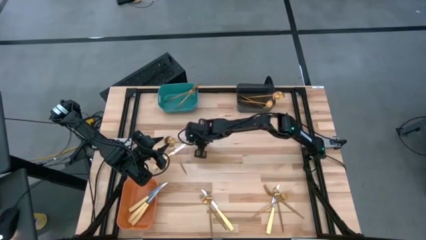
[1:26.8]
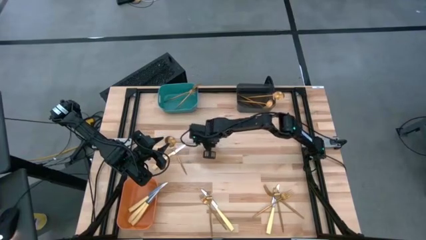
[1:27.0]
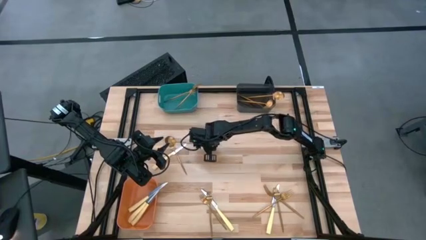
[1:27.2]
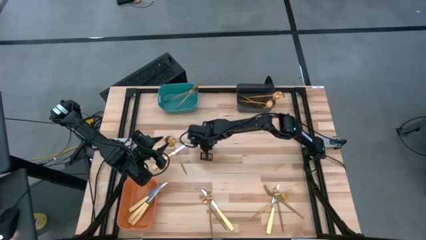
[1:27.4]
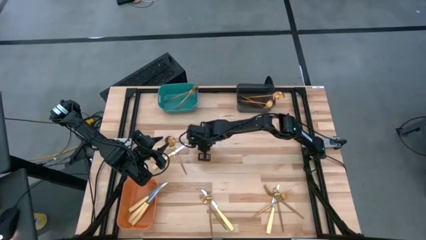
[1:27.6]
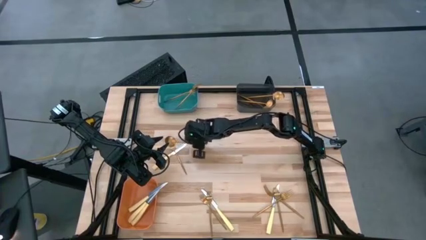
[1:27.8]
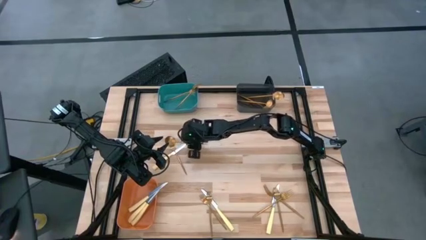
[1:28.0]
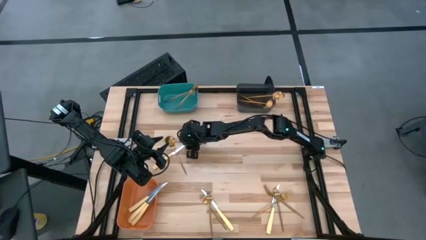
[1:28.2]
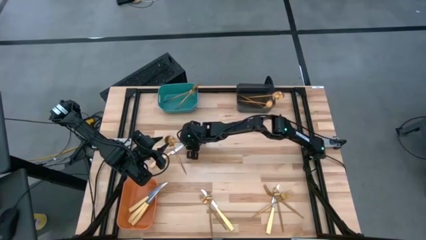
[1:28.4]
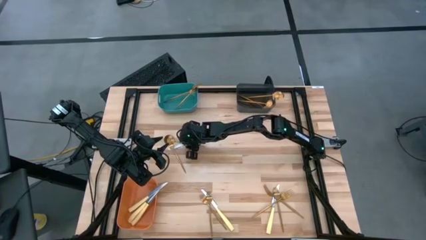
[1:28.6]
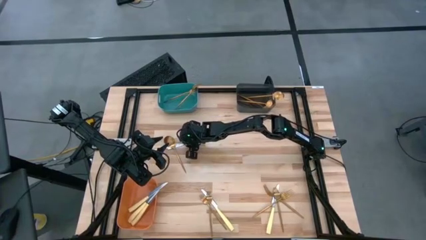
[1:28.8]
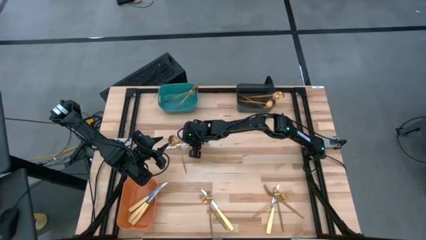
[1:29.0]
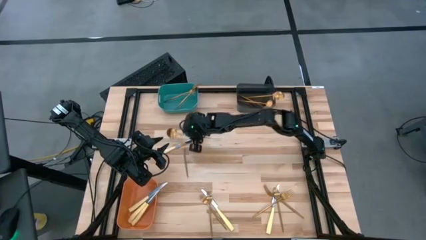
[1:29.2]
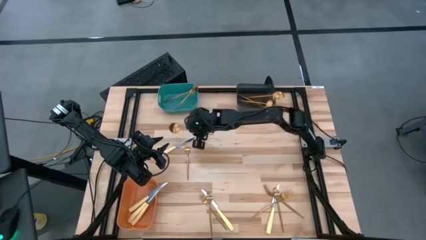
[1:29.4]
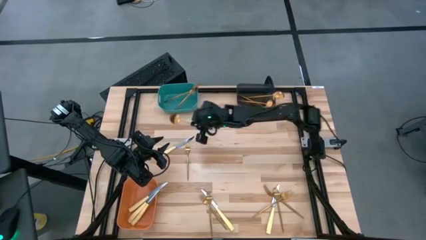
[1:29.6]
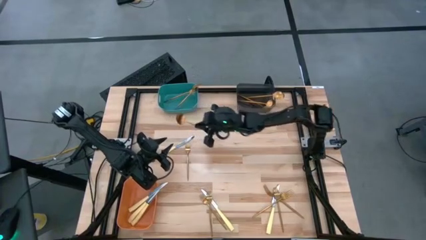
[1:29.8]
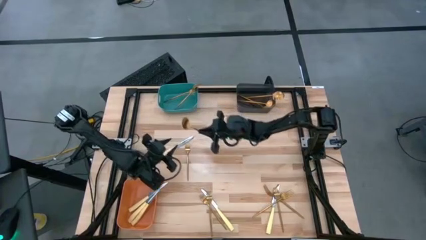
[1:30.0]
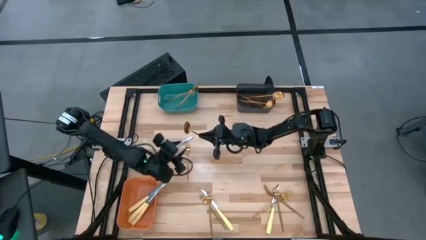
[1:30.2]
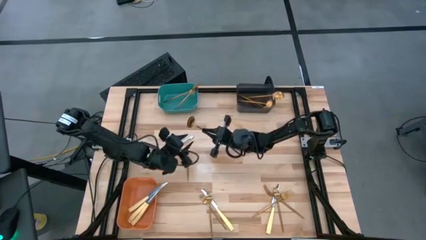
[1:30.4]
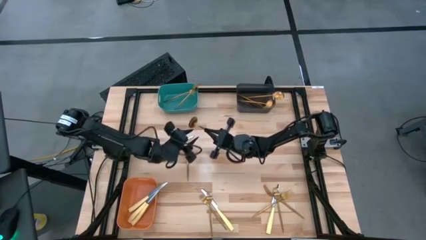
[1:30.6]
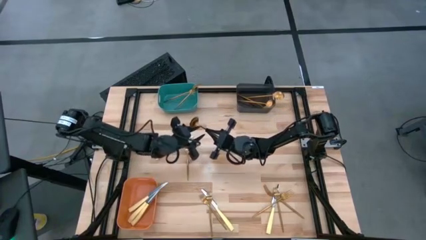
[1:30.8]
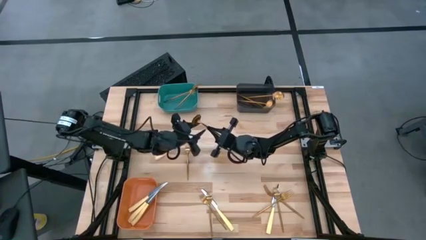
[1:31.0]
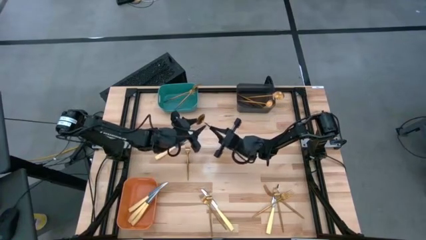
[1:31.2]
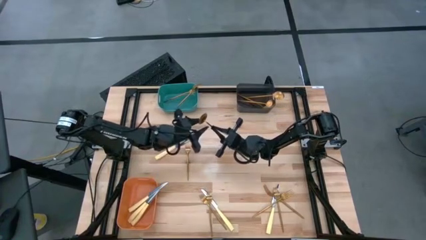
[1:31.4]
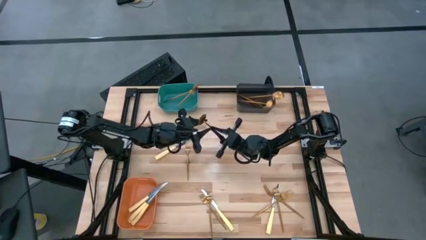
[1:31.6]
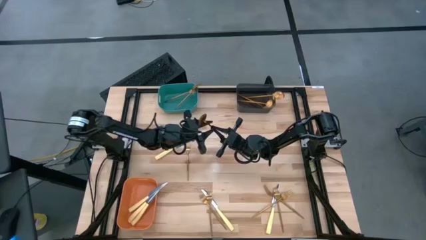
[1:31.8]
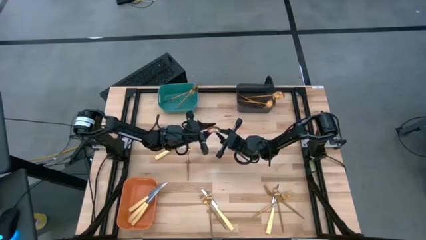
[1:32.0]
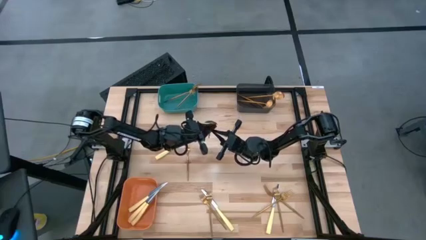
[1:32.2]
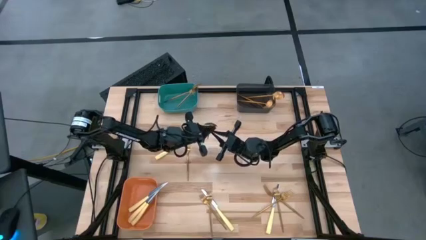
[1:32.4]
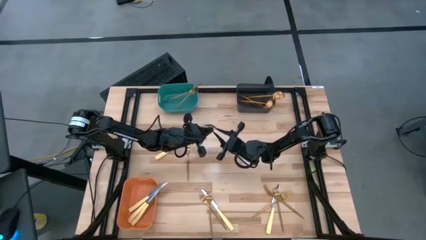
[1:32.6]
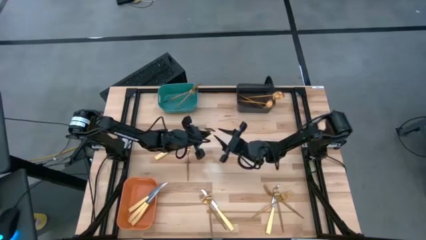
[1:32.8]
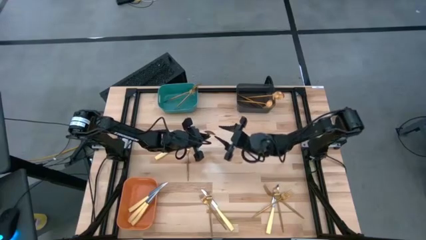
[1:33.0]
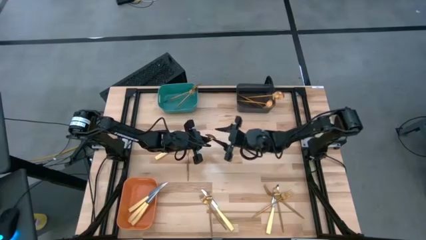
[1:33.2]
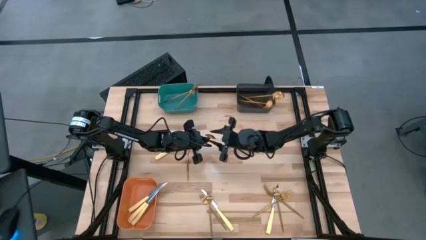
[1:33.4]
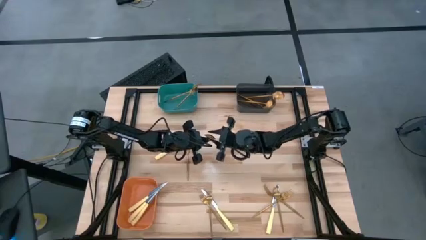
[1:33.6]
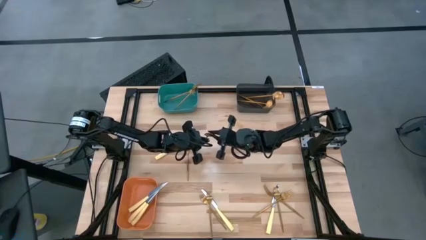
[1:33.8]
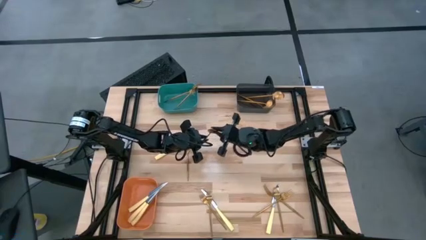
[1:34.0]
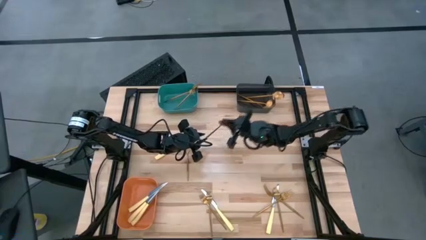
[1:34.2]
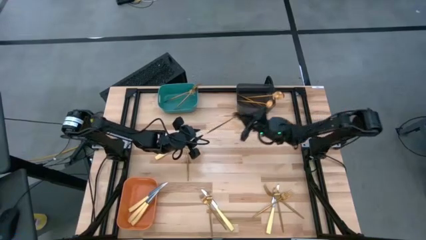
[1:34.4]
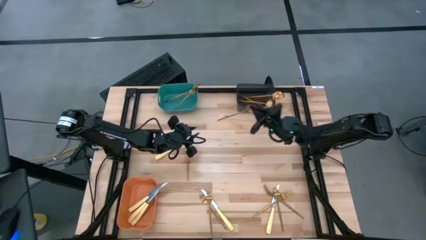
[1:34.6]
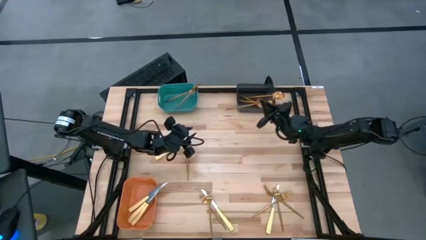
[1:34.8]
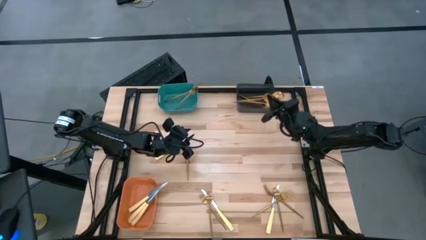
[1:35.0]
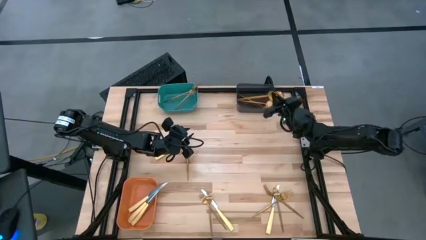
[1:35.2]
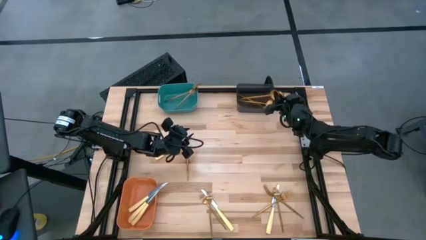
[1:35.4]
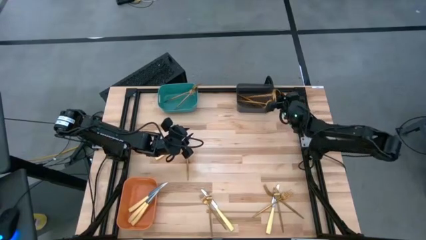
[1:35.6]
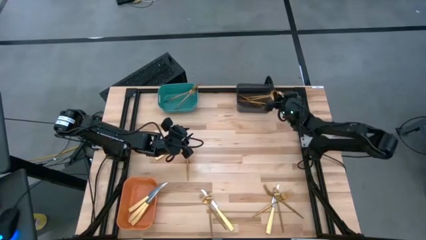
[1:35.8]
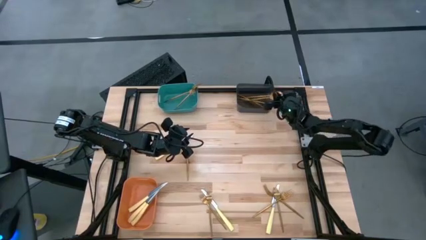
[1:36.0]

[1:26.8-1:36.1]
Task: Sort silverware by color (type)
Put the gold spoon into the black bin

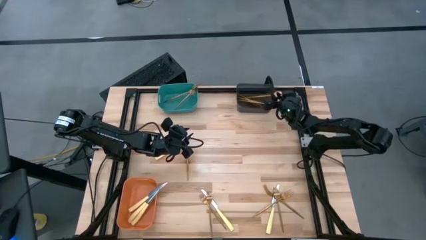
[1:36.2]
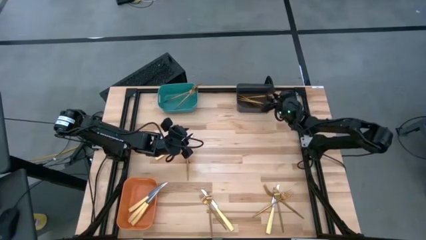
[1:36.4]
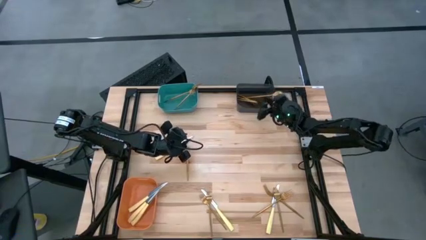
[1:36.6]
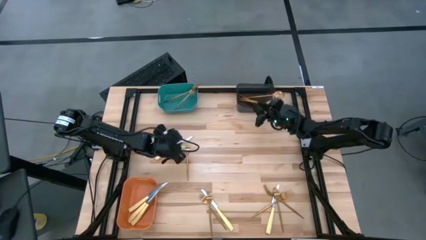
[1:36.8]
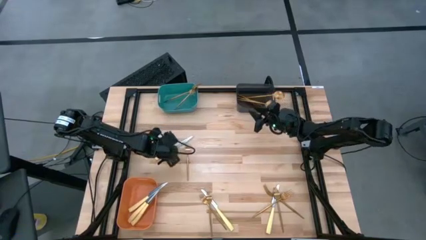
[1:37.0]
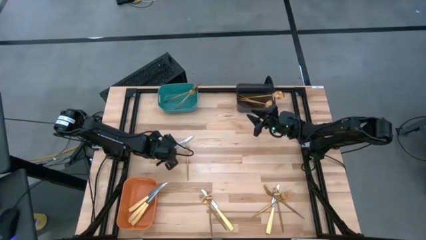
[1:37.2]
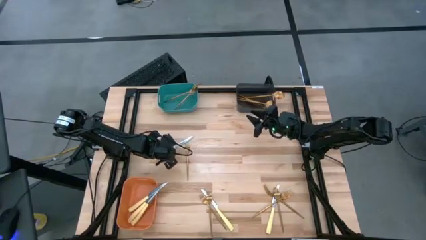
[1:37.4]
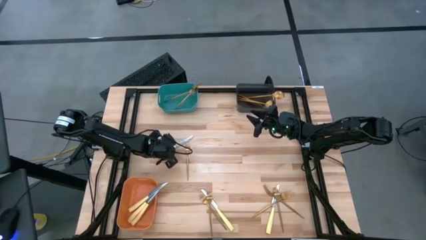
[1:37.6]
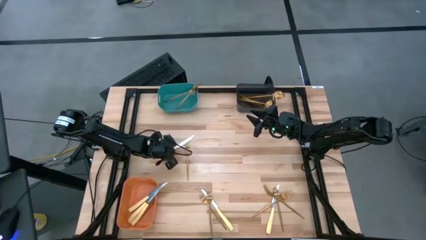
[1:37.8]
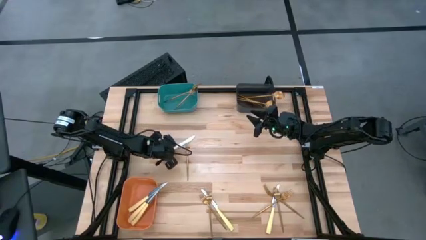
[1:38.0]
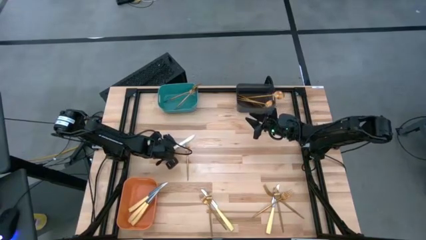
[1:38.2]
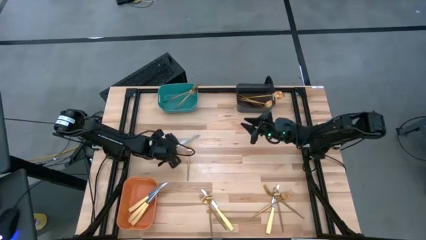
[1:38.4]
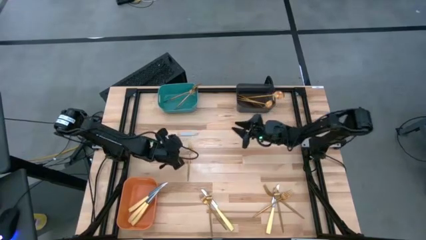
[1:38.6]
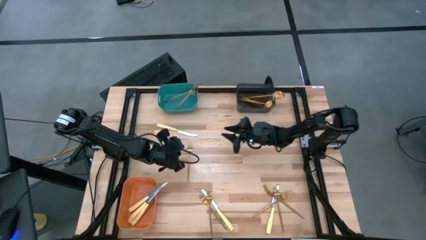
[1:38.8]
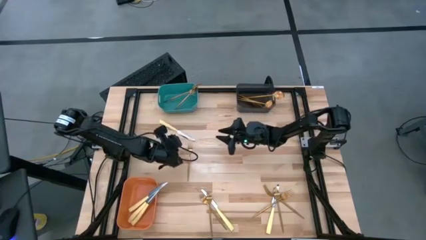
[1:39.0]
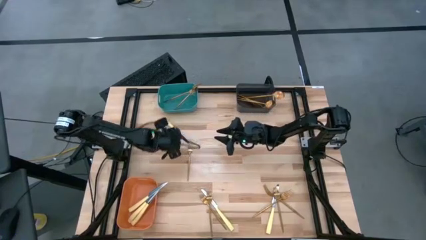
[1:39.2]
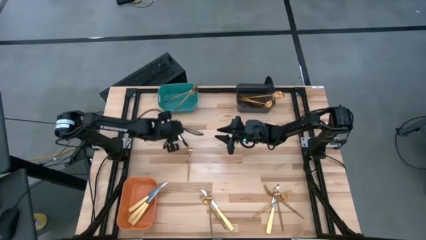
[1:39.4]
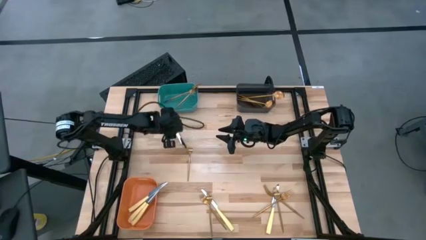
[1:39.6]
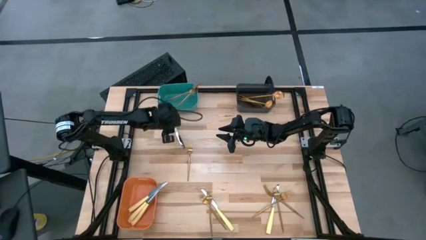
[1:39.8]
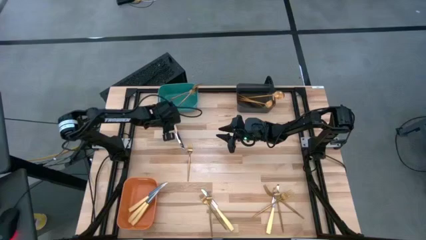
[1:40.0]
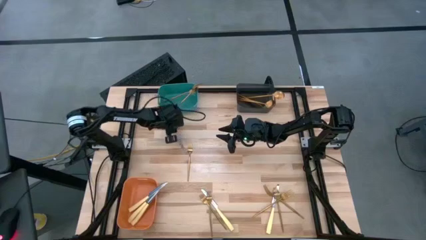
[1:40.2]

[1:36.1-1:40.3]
Put the yellow table knife into the orange bin
